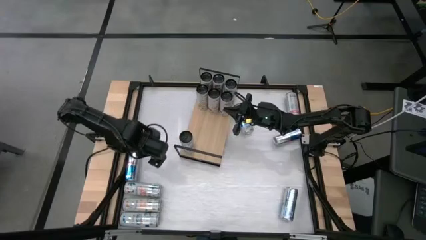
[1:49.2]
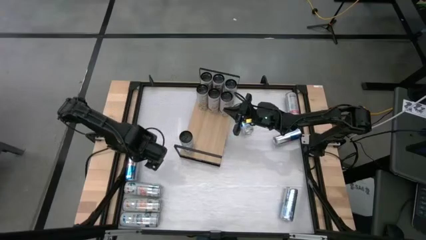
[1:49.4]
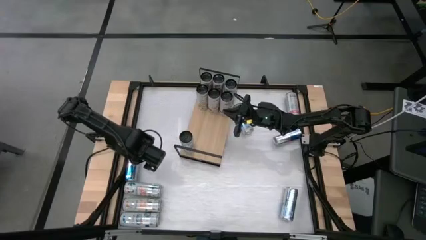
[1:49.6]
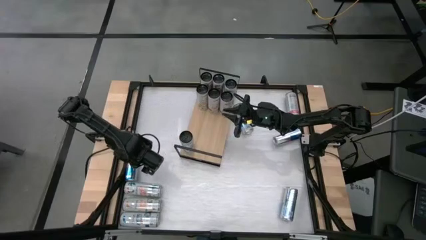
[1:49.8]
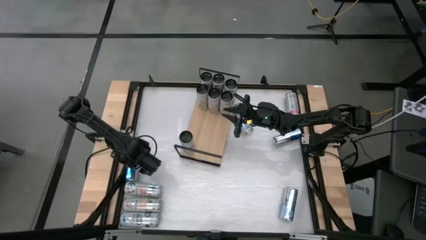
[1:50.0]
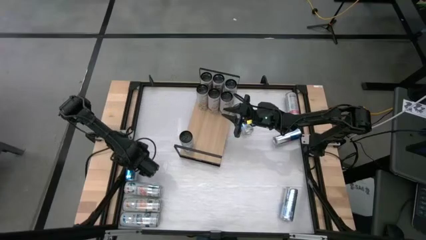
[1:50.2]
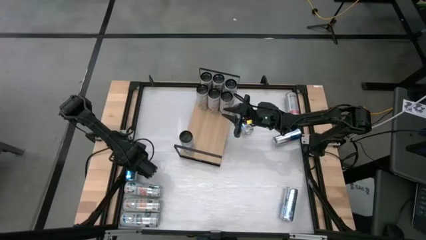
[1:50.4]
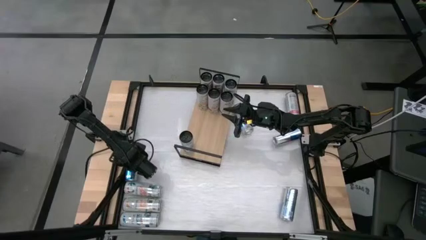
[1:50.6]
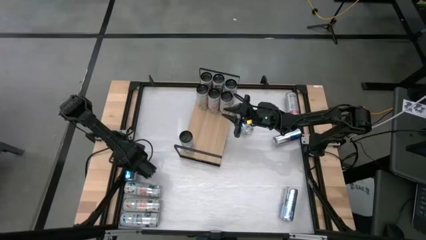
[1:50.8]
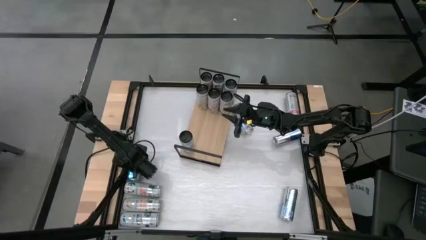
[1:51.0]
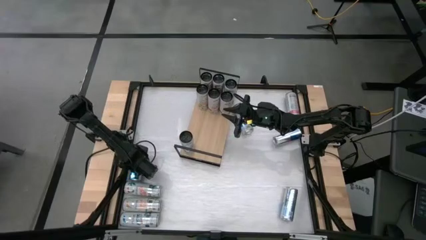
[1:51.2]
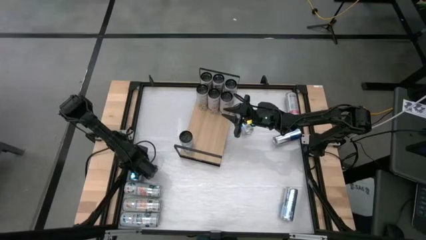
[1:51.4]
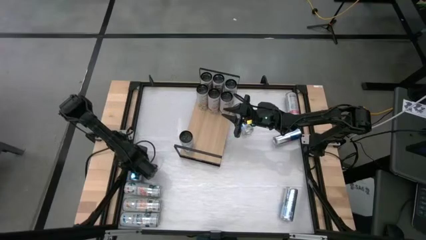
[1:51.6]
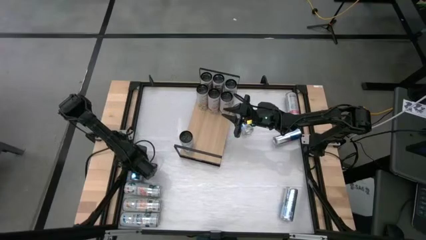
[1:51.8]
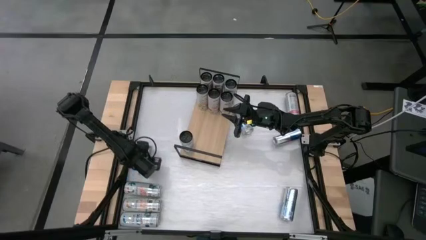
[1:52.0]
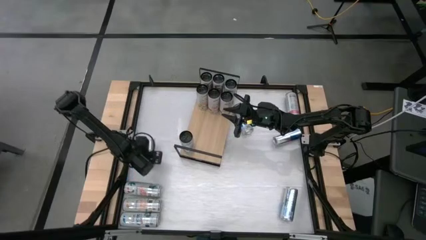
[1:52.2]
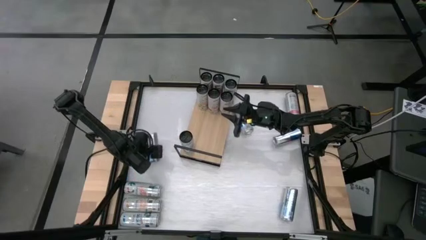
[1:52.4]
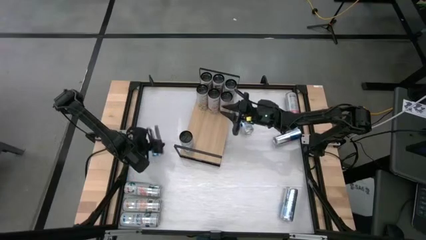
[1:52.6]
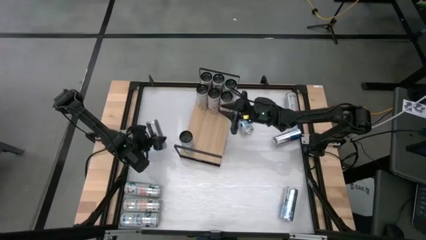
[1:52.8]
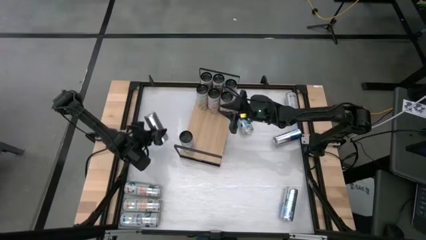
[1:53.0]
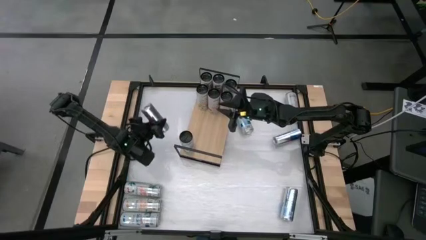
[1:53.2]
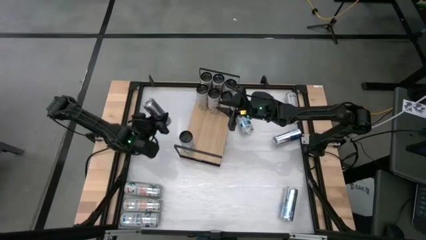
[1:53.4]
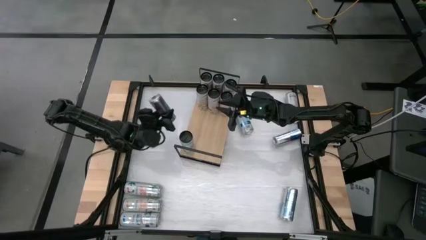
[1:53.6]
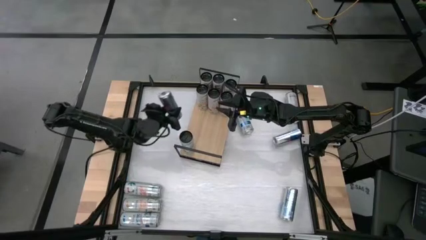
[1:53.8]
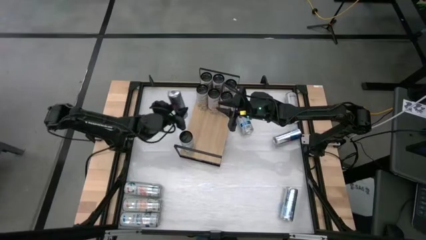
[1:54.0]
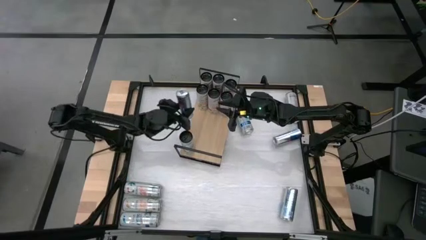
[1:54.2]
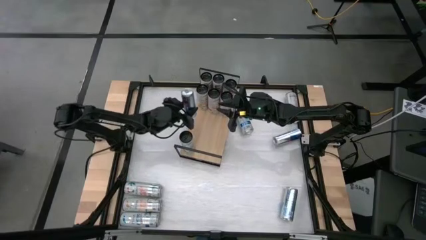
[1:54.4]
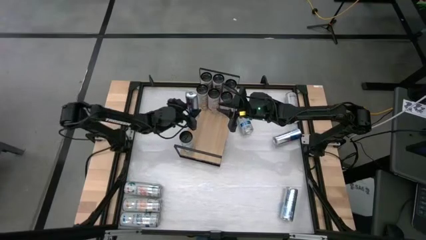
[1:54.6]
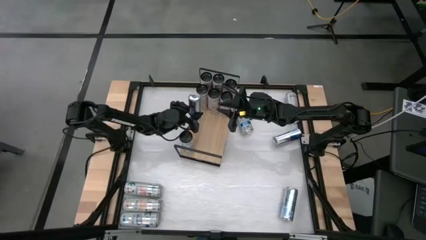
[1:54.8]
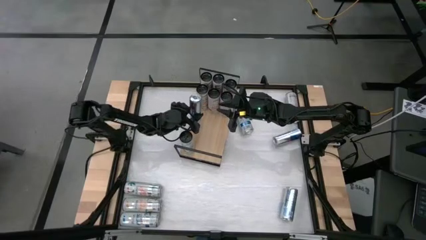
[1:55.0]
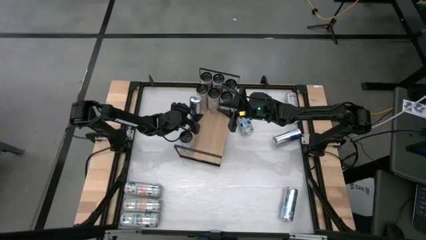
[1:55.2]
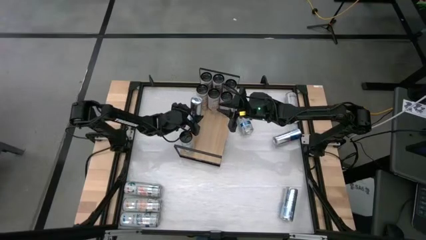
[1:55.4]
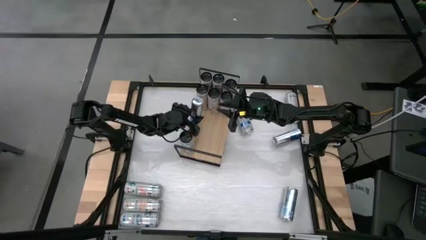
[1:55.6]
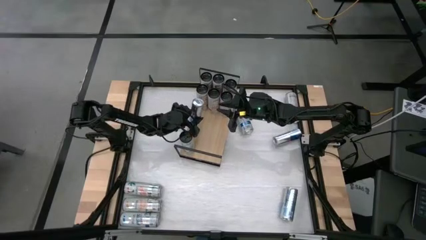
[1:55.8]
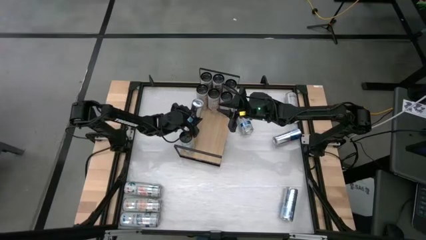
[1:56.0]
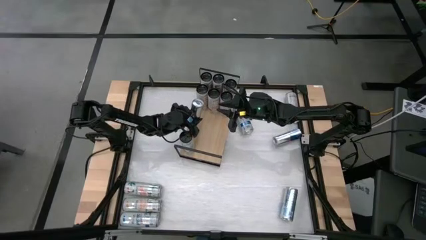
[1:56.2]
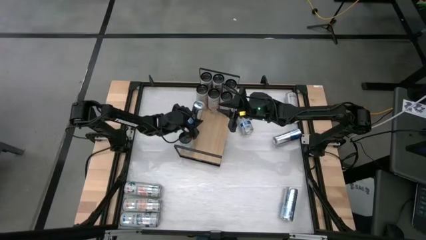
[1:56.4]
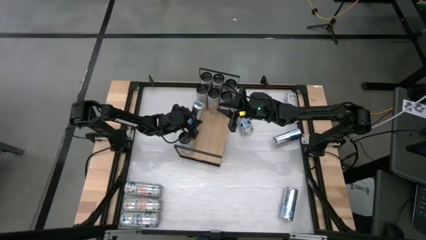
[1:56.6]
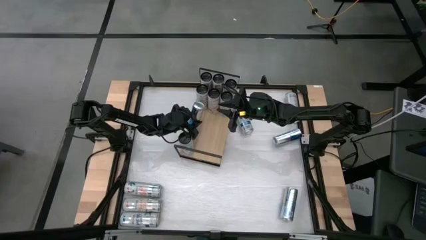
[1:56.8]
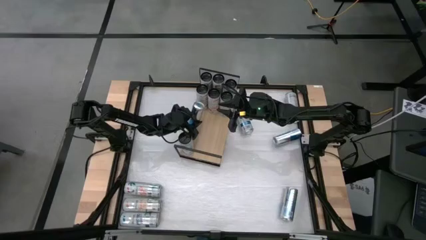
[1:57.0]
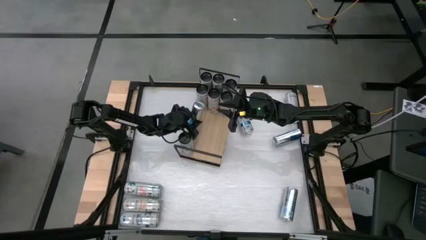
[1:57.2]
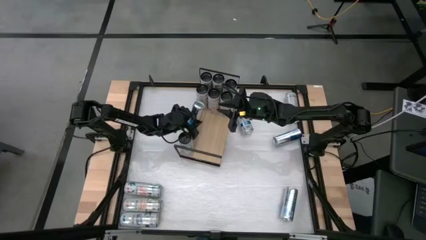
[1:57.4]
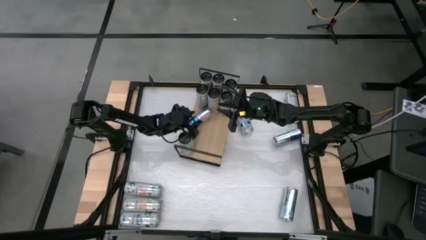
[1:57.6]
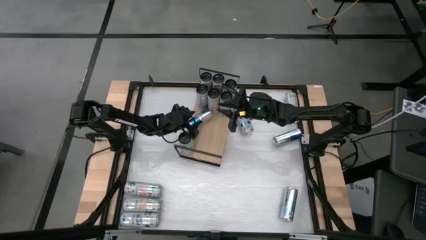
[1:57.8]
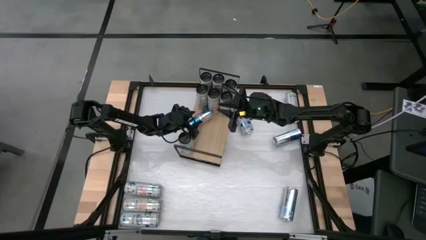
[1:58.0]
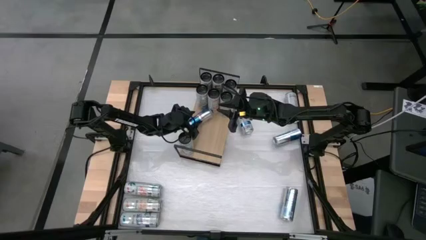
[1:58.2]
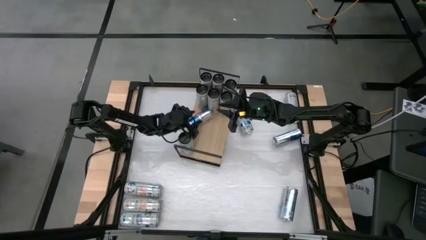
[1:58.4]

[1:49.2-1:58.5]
Task: Place canned beverage on shelf
Put the middle left silver soda can on the shelf

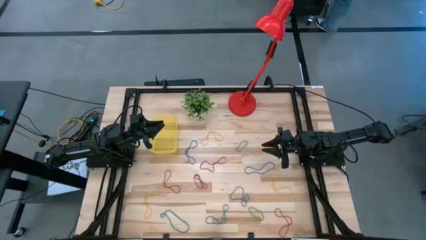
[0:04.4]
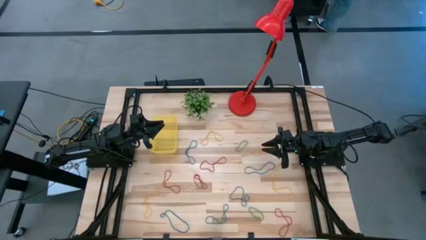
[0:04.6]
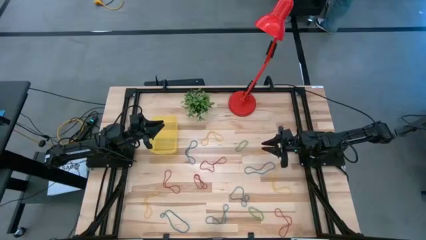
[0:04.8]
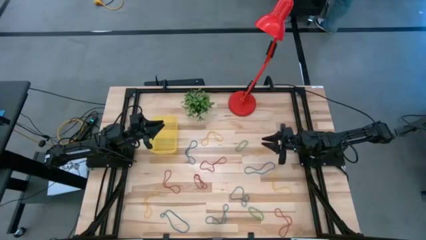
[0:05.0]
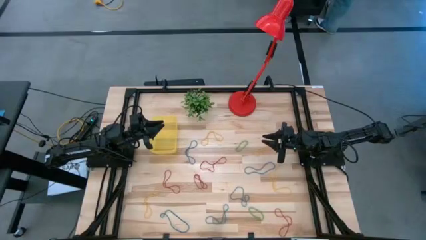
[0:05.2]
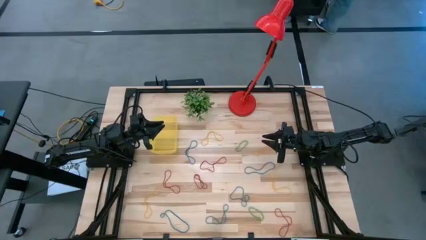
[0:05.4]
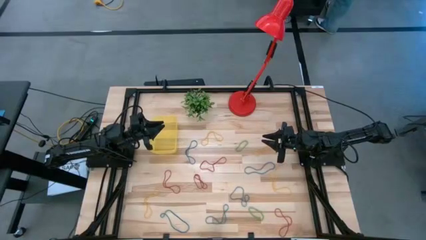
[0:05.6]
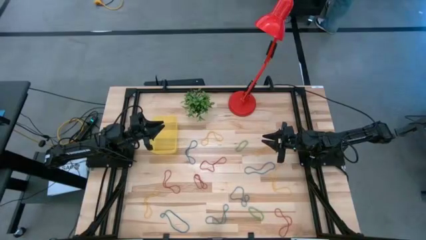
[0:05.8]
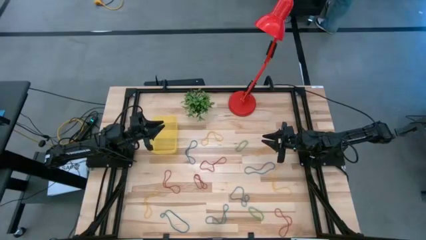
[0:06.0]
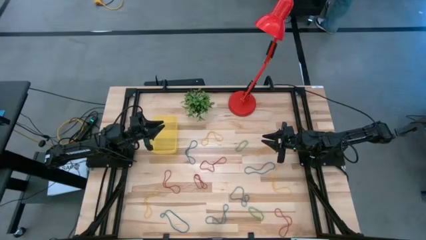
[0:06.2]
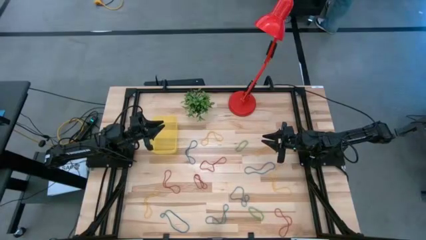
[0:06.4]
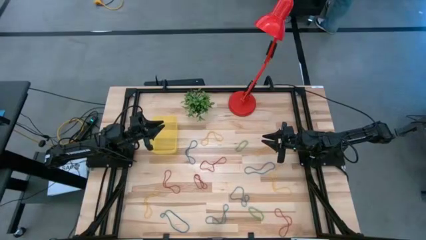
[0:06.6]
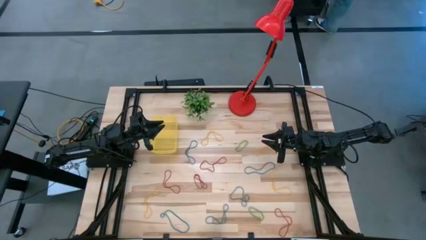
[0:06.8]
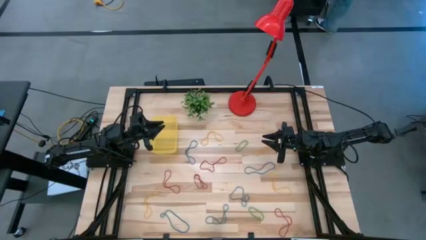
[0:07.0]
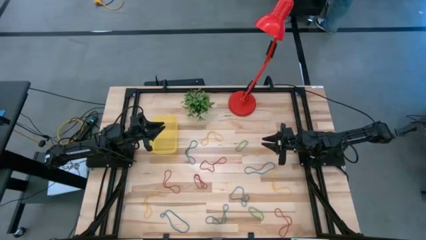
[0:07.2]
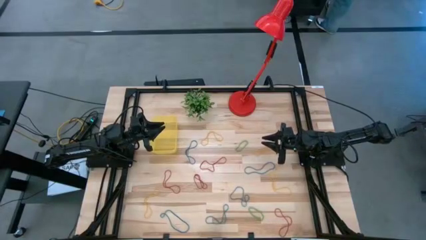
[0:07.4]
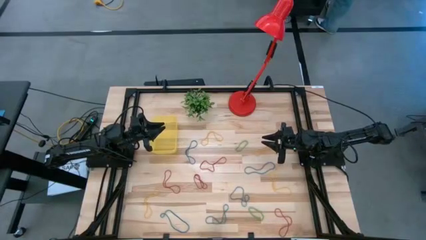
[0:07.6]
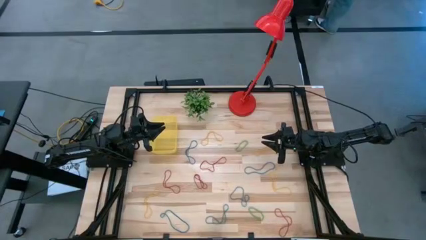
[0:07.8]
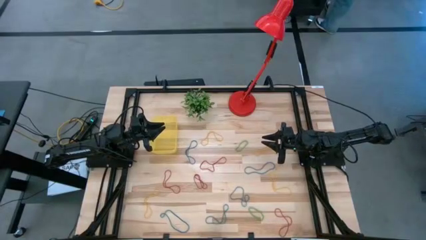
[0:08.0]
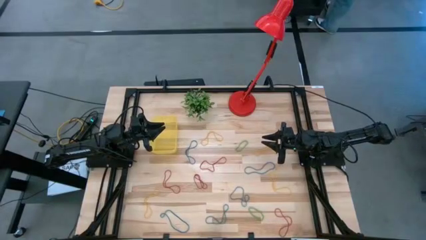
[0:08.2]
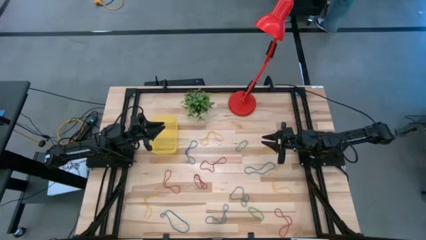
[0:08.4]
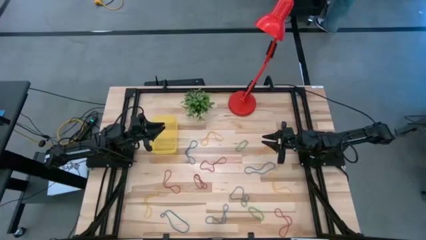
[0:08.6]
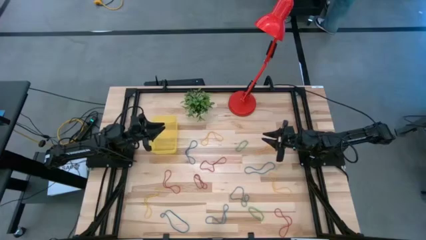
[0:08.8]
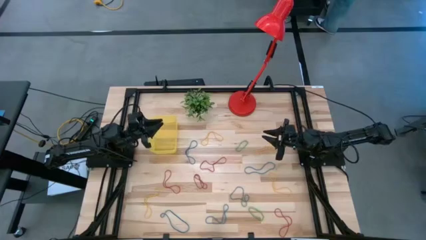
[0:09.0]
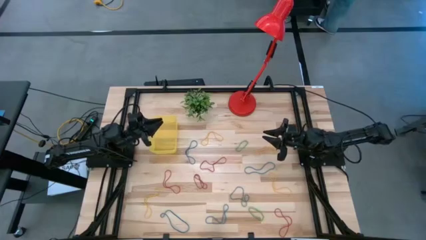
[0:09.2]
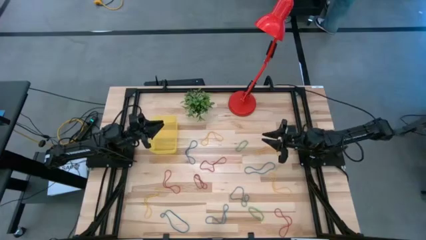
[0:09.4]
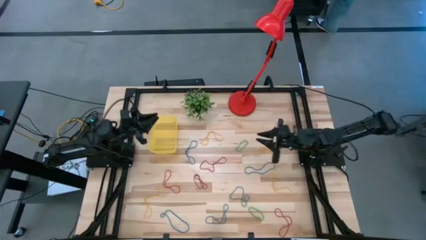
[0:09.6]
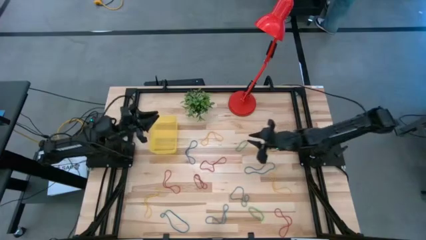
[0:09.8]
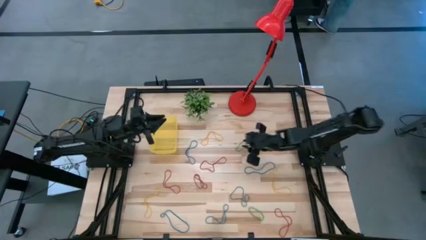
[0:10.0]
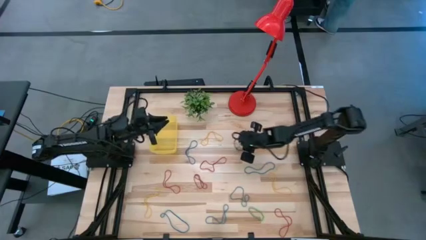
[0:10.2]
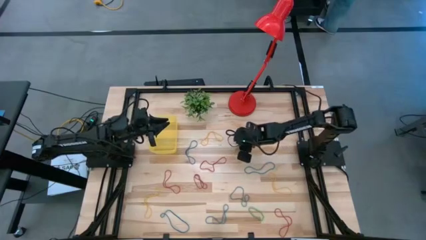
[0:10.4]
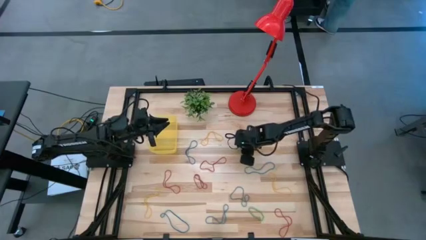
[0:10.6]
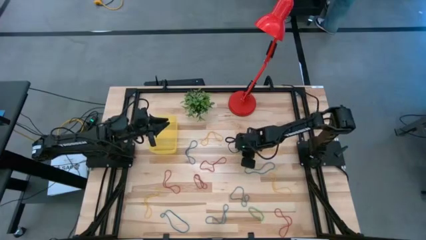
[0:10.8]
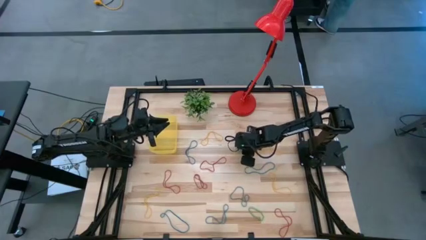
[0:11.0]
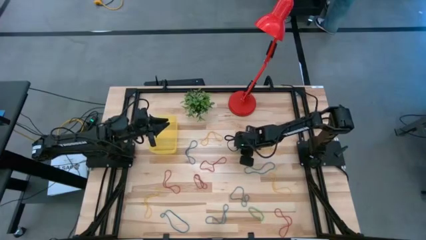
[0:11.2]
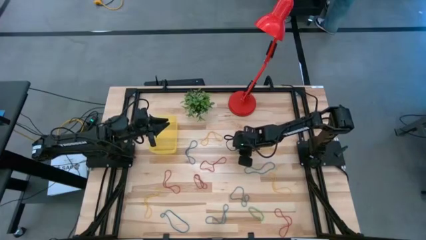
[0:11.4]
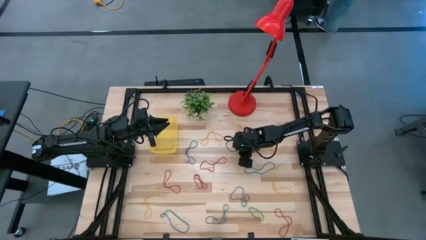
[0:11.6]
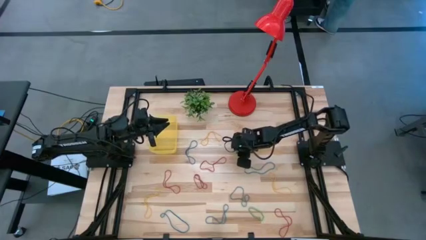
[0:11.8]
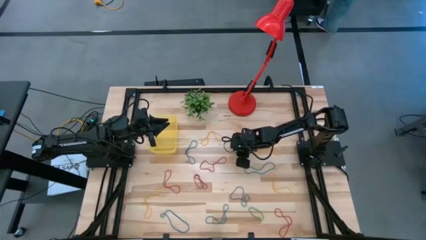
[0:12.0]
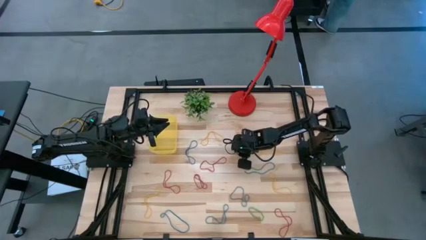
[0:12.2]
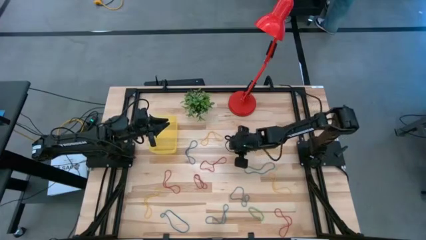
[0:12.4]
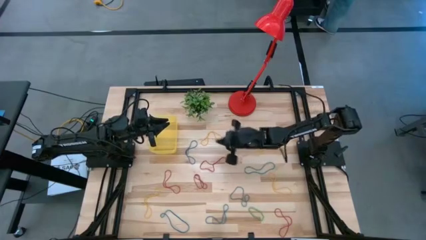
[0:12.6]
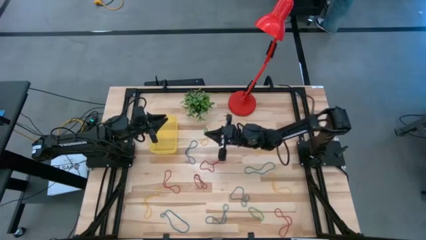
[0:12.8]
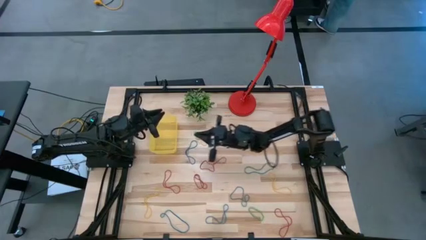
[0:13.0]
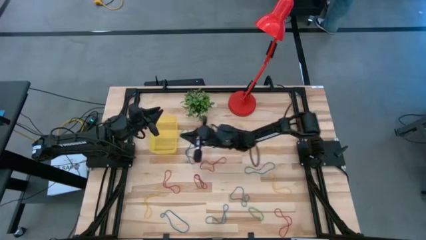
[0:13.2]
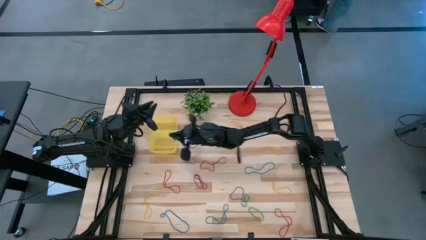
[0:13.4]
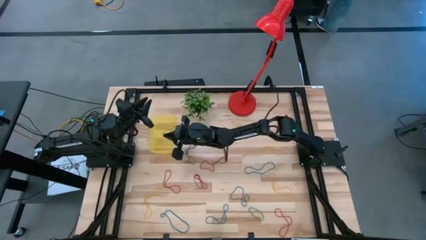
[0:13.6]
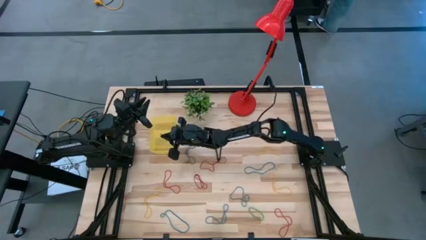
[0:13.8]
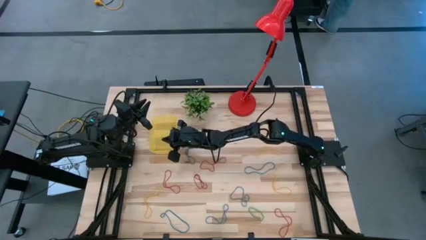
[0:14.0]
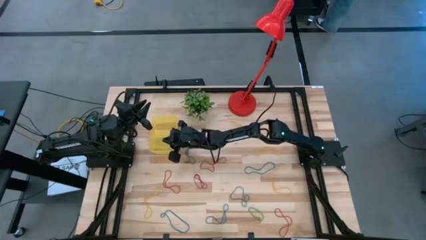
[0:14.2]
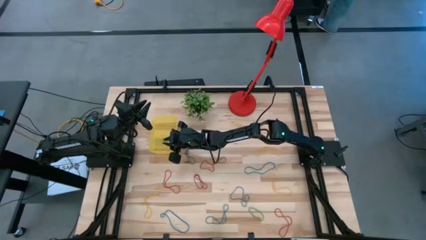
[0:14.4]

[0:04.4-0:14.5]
Task: Pick and place items into bin
Put the green rubber band into the yellow bin
